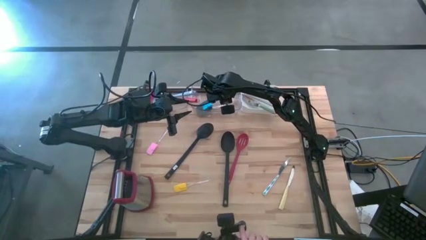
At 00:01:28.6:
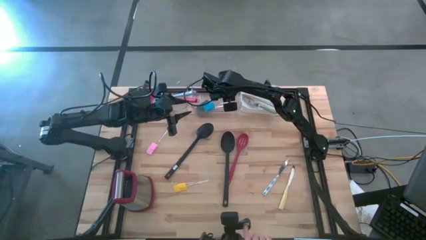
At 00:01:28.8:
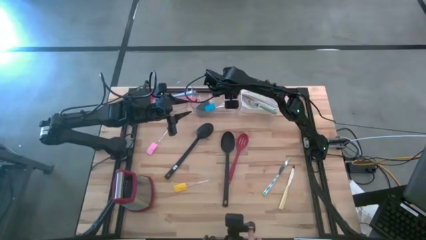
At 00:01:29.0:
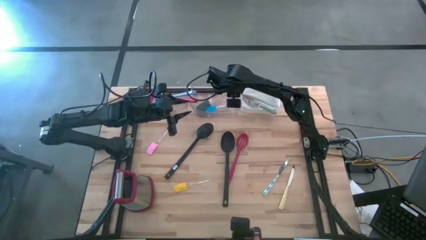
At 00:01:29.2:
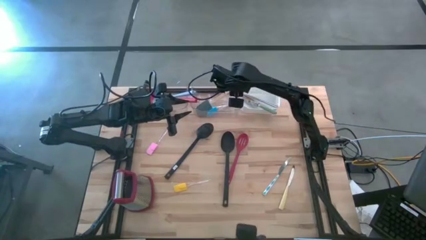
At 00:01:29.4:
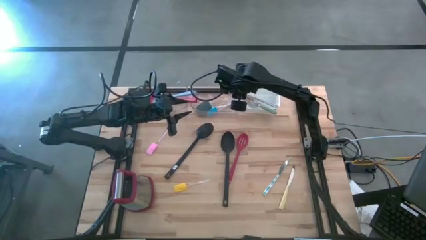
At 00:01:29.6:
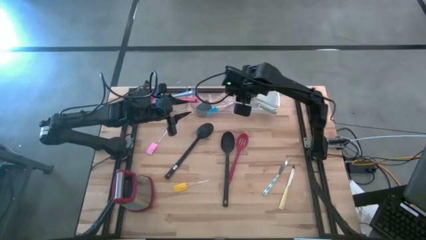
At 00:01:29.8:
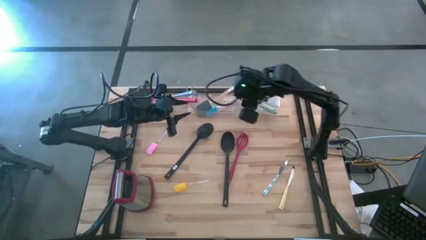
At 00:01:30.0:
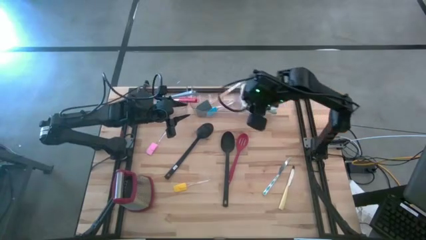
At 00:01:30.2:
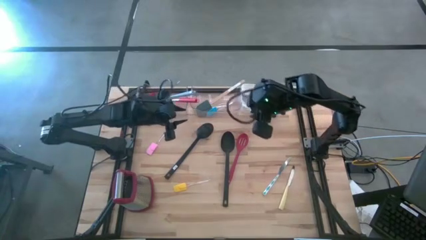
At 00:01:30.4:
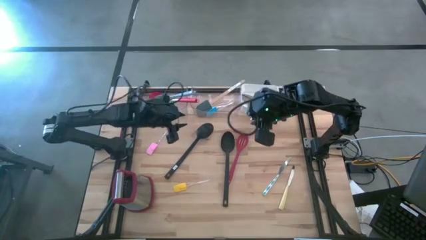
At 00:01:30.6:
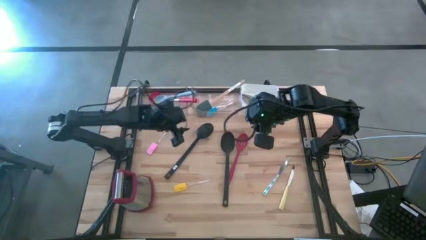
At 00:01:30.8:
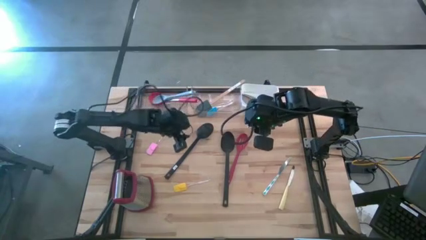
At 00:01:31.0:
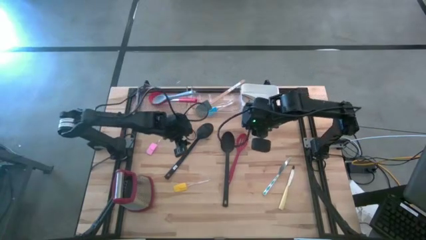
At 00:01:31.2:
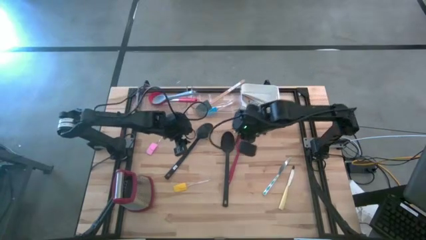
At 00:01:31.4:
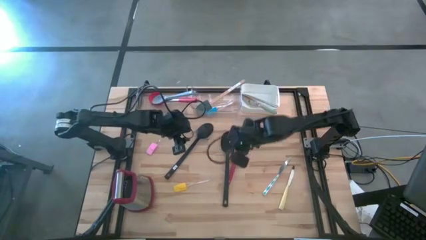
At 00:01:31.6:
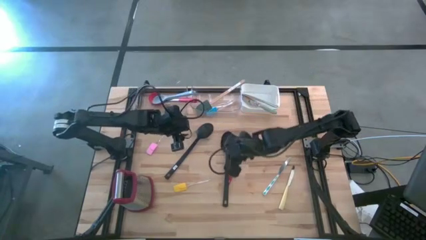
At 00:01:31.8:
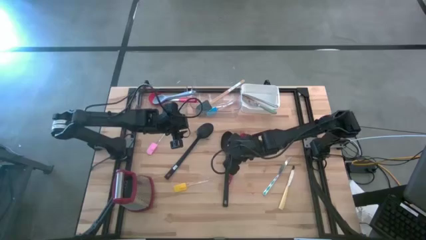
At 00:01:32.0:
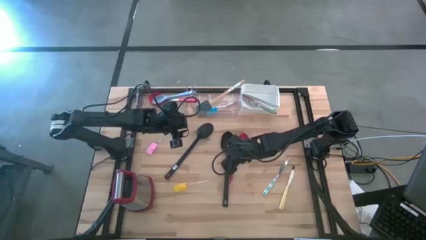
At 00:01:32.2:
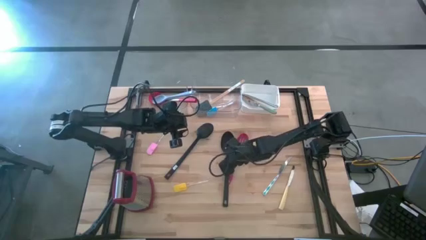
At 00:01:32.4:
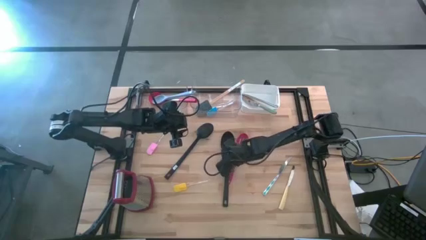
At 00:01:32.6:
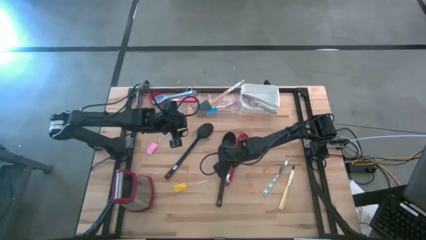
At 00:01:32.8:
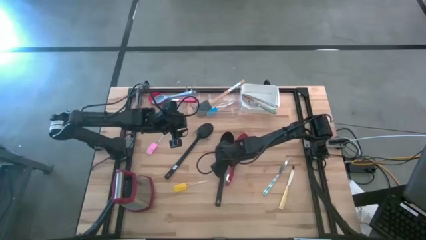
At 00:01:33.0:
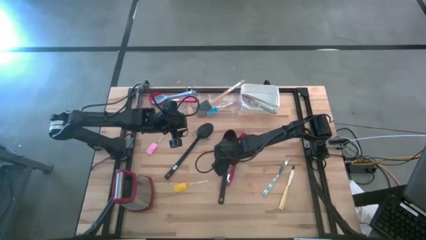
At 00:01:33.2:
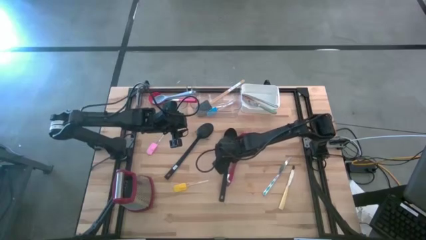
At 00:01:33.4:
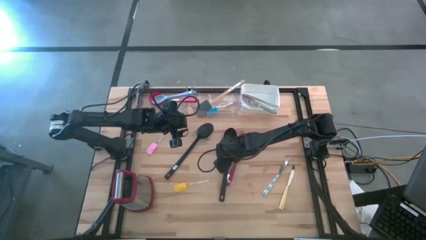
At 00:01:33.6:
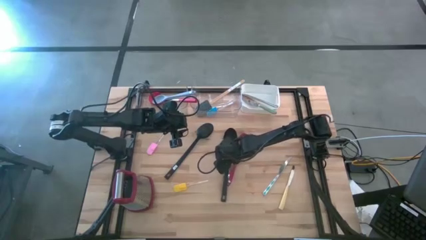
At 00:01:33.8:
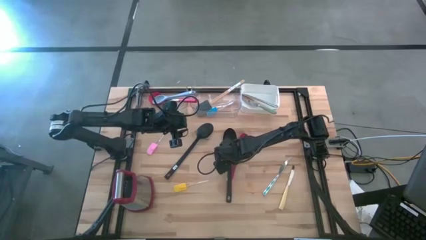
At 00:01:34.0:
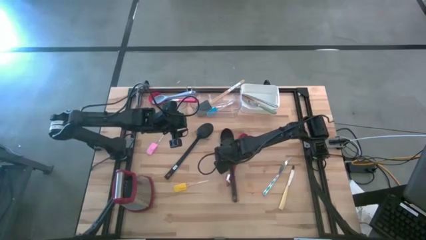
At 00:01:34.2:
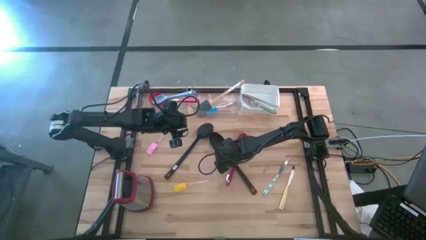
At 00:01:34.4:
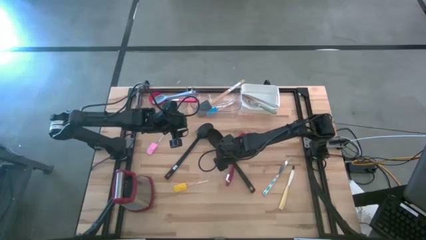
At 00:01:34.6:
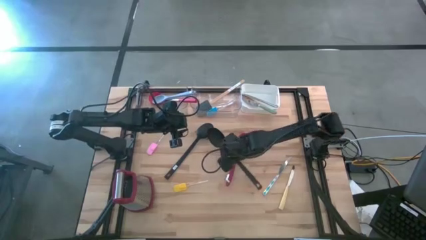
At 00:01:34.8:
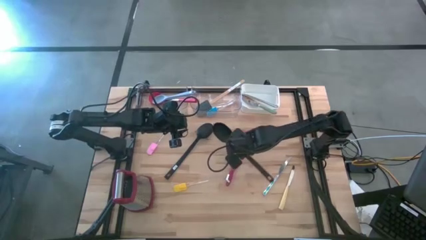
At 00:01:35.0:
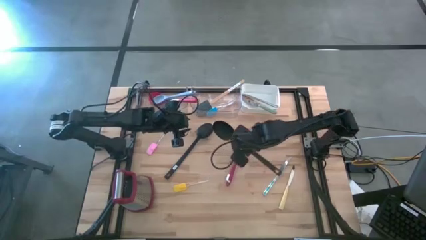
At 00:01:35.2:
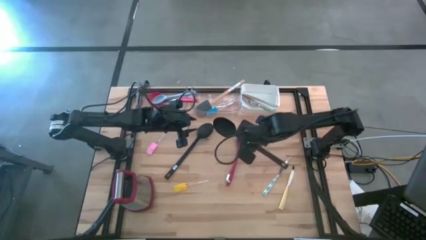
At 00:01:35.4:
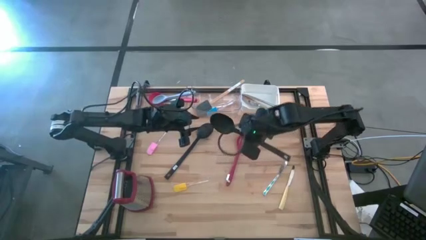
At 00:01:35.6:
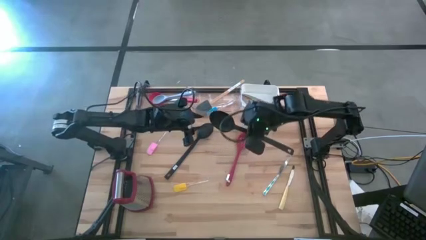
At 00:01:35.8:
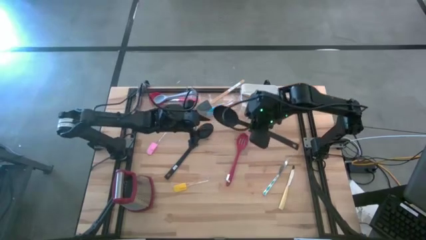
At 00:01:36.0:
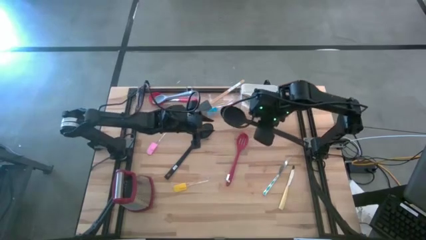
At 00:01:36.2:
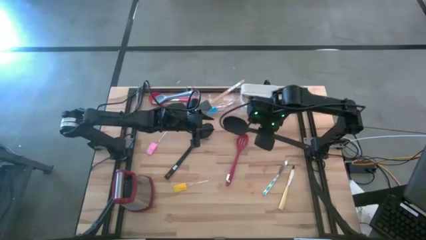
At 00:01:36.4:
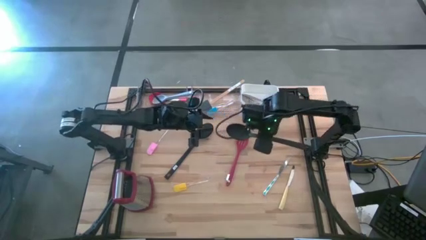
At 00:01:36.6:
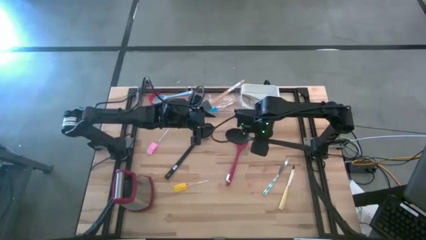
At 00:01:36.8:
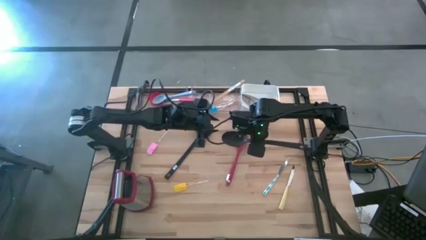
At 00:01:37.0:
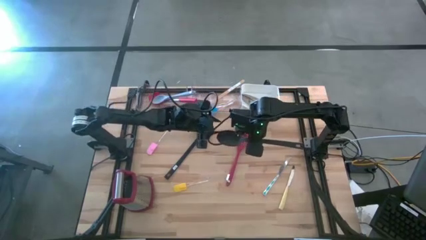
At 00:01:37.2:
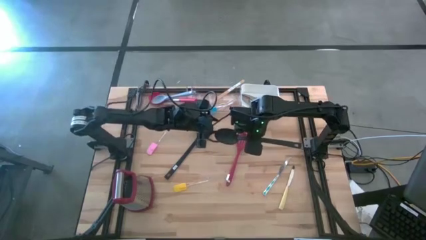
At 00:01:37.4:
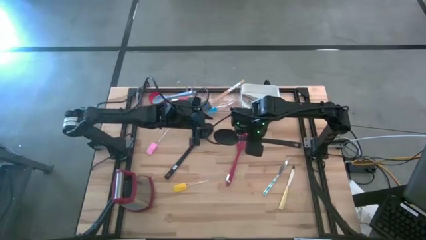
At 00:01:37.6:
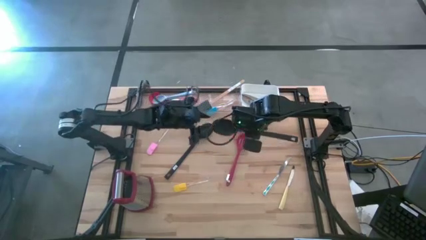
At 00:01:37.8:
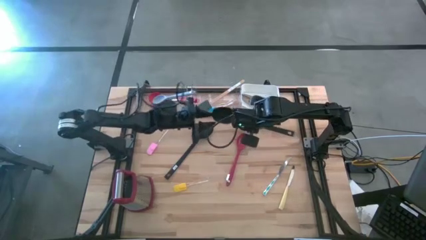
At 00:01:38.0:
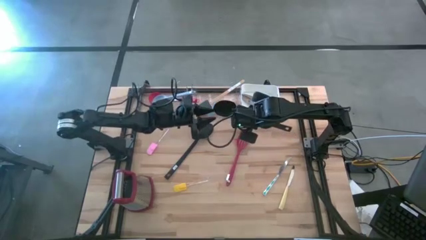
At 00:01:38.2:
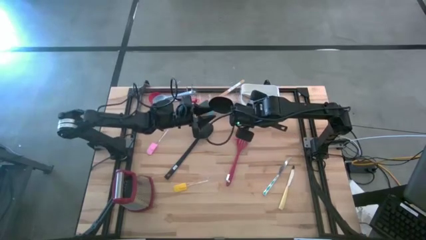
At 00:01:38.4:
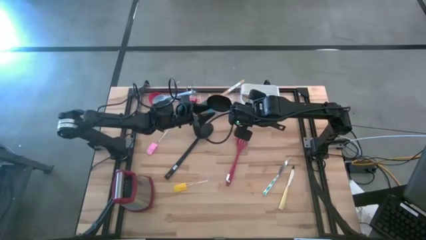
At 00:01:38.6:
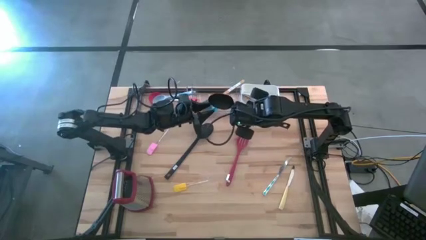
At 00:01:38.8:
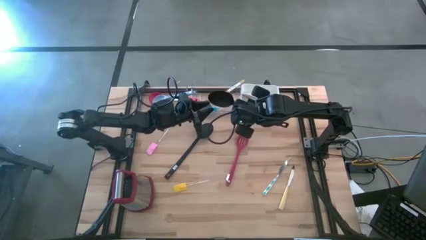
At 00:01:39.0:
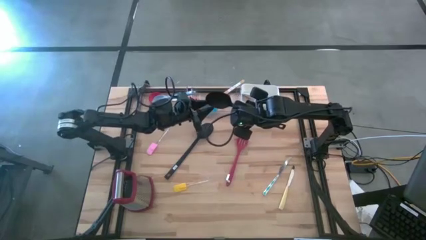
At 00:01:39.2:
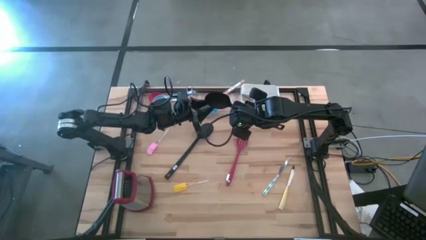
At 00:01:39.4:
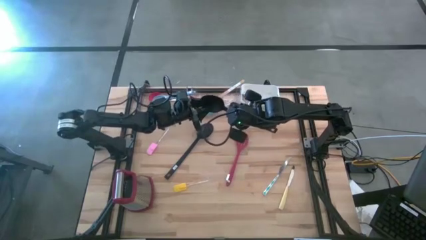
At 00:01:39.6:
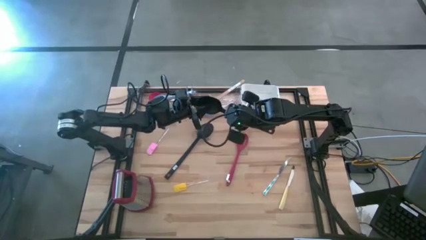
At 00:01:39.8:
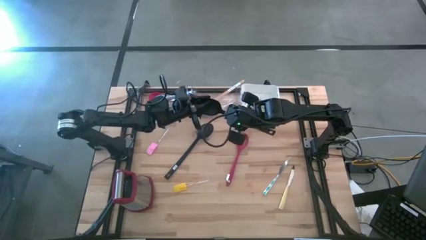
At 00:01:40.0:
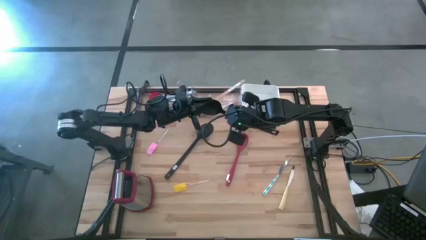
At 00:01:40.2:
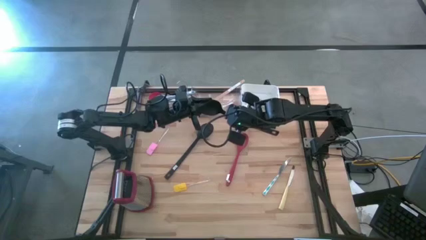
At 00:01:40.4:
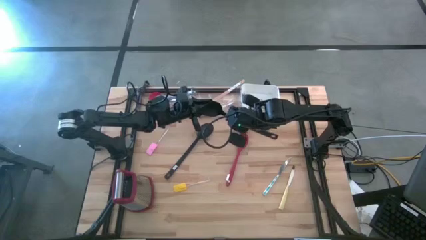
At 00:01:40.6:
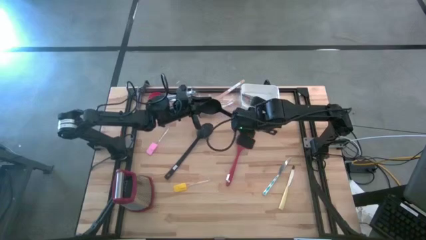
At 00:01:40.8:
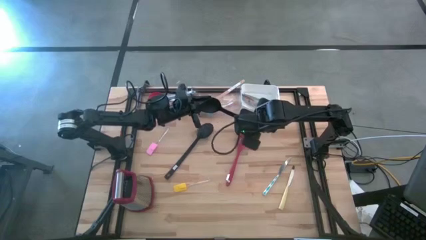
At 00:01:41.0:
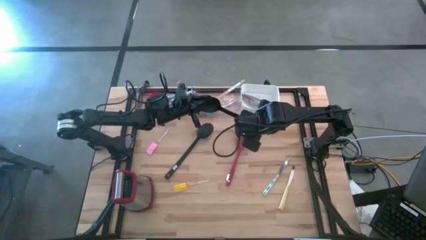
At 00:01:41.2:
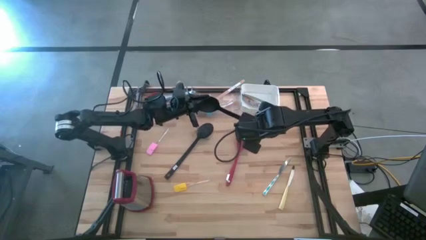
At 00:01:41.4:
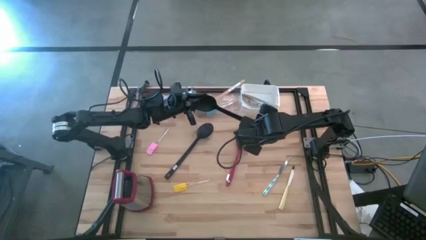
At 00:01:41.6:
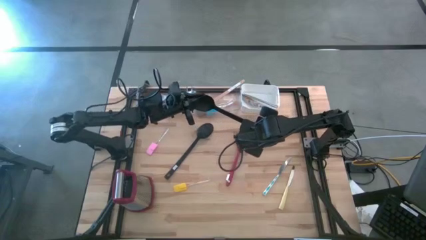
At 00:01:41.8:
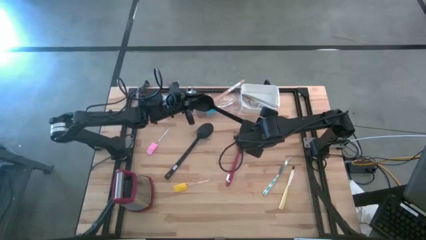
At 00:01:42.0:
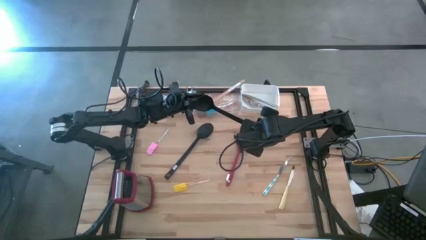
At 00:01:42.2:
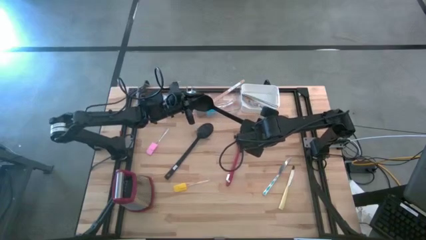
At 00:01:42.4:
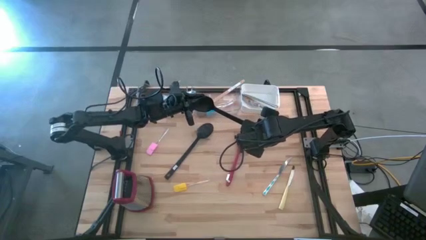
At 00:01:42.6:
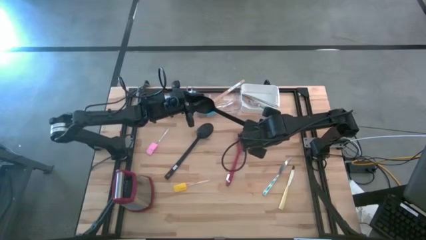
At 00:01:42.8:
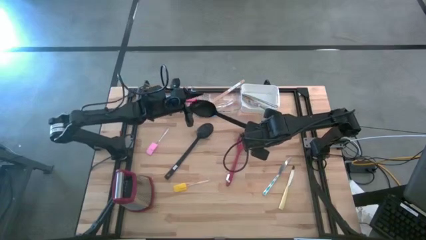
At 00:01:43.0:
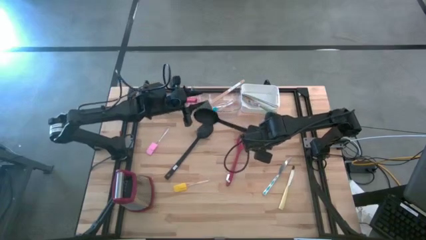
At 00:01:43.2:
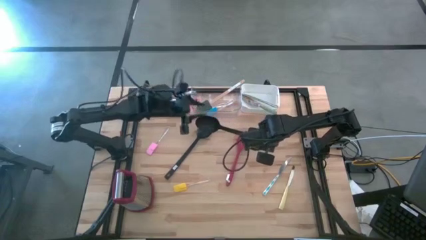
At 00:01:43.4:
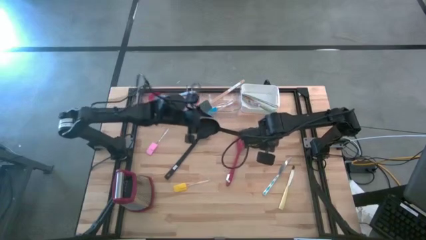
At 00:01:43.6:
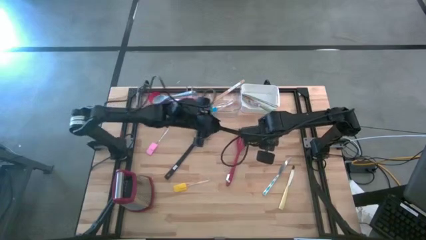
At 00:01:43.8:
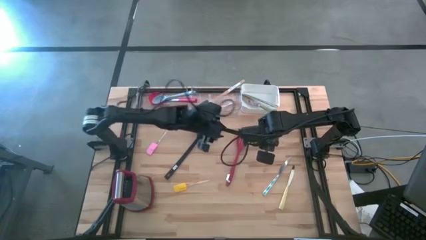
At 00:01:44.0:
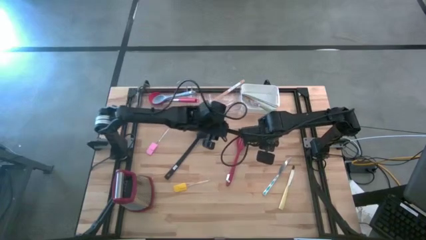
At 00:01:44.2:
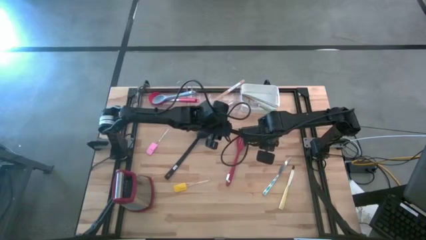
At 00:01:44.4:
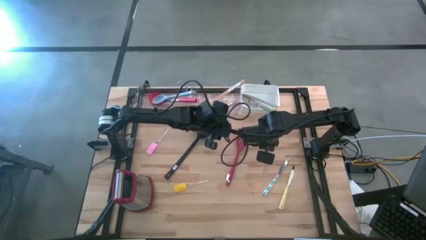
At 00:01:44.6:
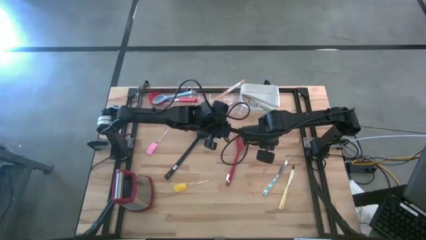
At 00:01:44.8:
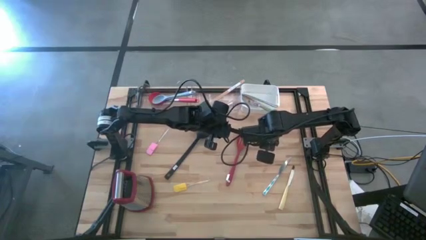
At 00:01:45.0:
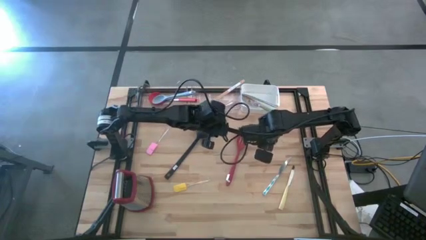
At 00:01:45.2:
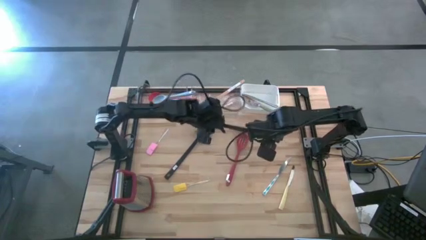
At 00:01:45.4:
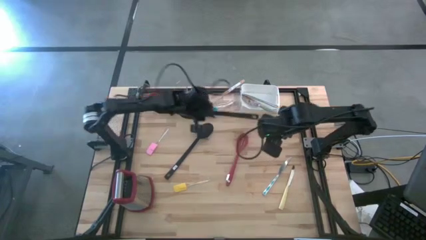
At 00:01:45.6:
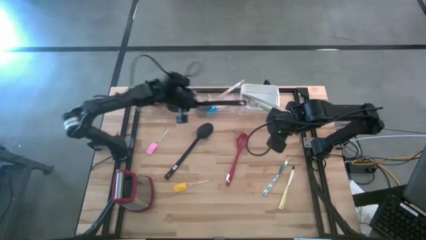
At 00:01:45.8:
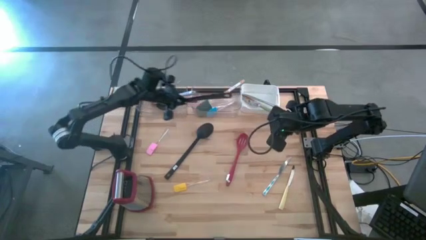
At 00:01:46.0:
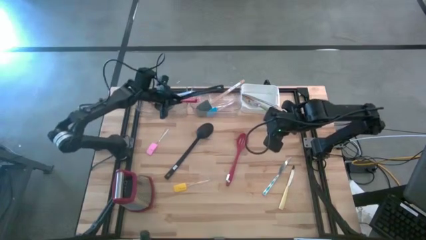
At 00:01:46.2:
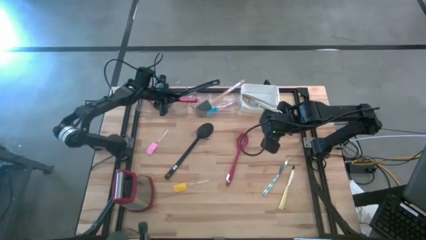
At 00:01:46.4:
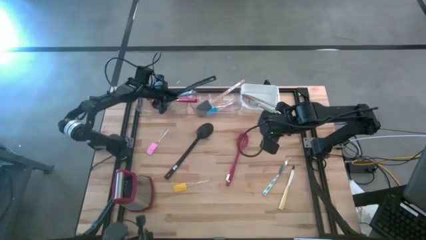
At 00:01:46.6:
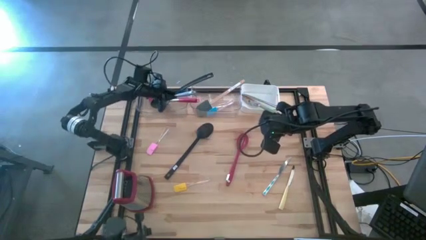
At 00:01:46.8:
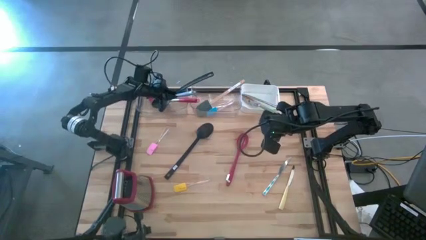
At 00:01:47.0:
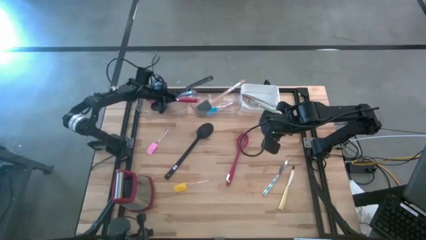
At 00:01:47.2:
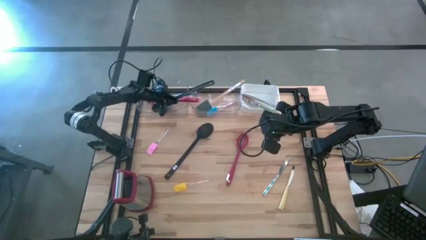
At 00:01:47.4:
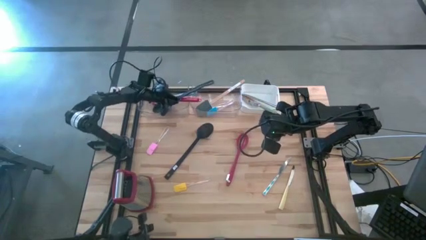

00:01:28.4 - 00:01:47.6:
Task: Pick & Place Kitchen Items
Put the right black serving spoon into the left transparent bin
